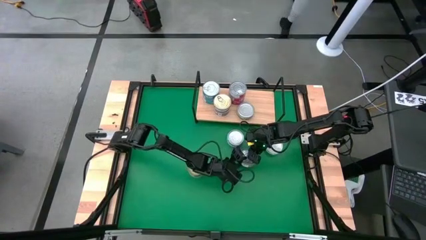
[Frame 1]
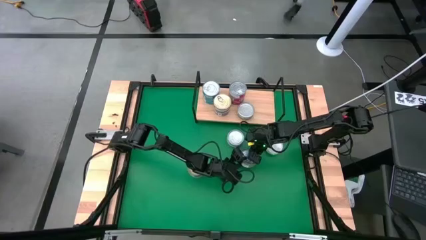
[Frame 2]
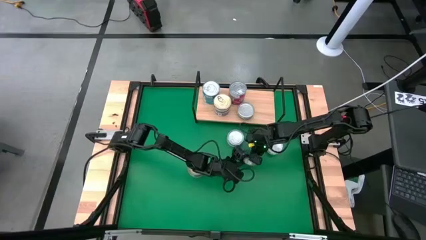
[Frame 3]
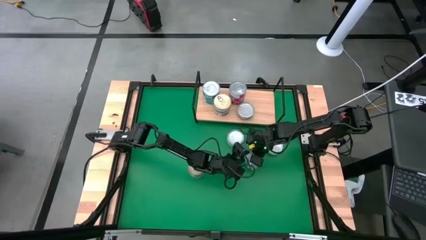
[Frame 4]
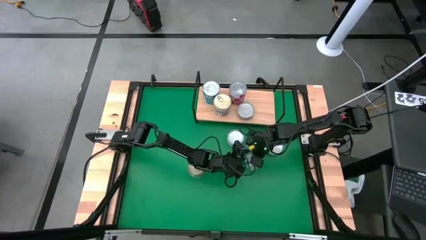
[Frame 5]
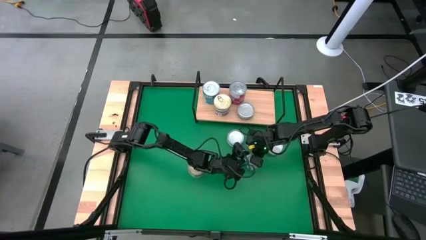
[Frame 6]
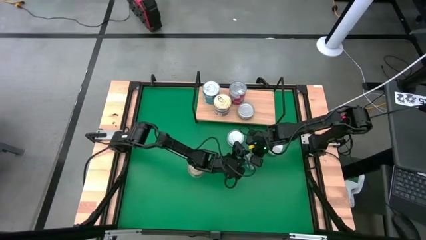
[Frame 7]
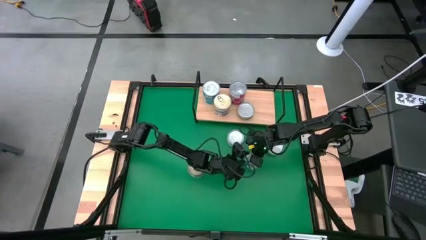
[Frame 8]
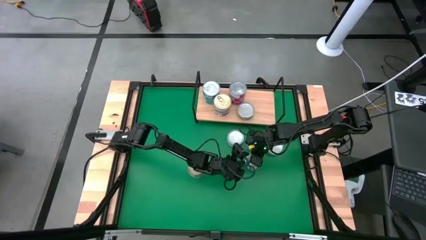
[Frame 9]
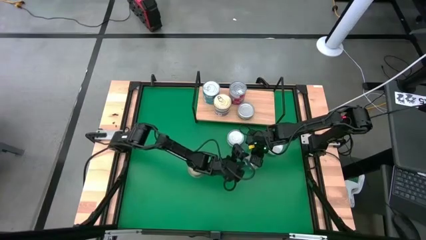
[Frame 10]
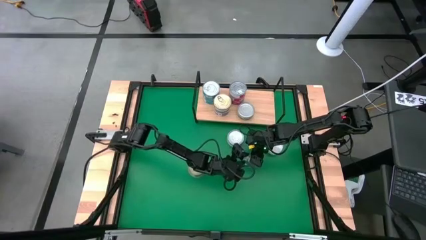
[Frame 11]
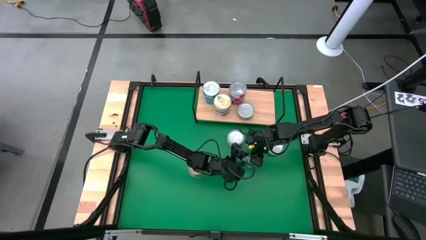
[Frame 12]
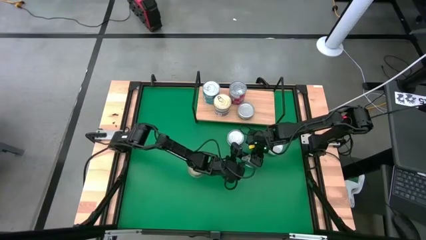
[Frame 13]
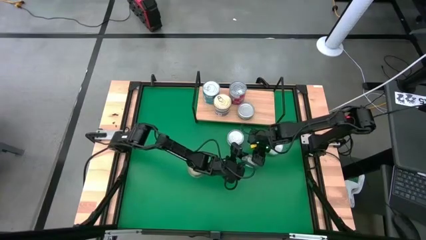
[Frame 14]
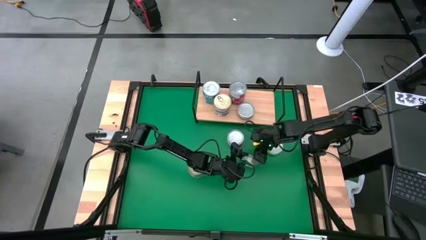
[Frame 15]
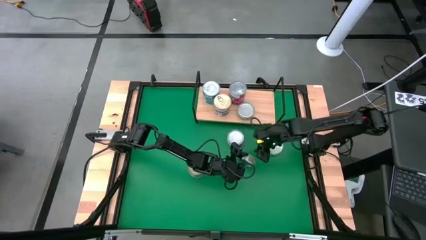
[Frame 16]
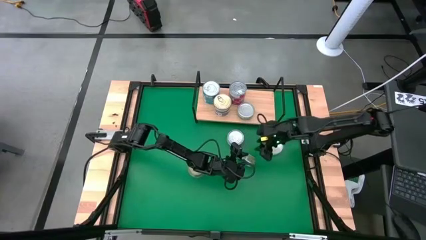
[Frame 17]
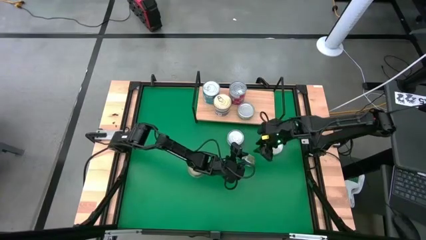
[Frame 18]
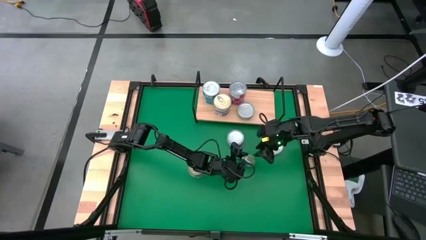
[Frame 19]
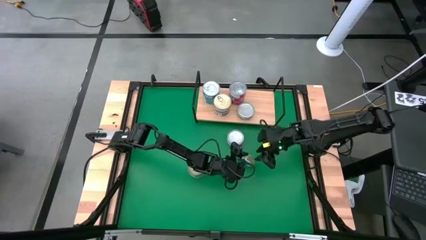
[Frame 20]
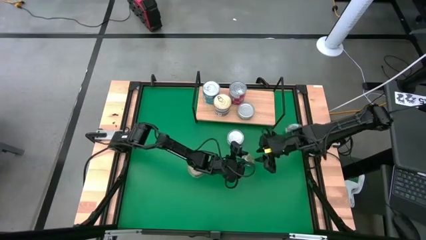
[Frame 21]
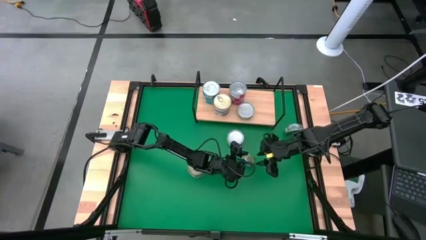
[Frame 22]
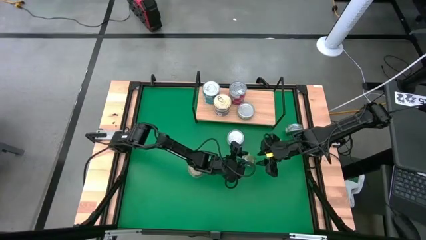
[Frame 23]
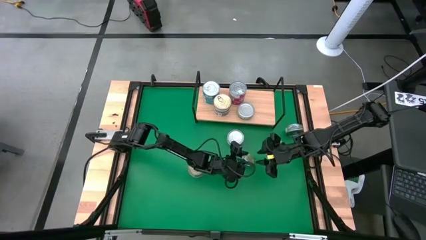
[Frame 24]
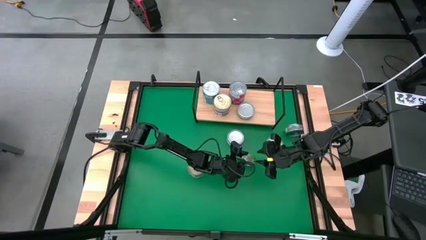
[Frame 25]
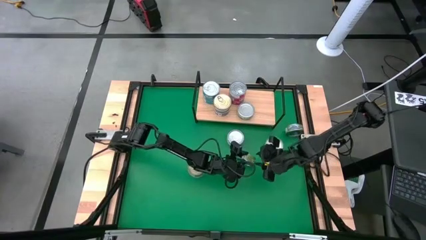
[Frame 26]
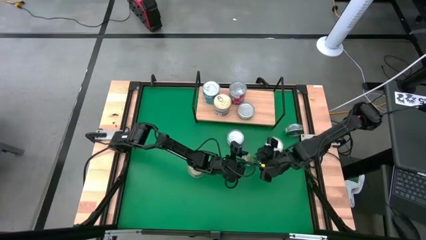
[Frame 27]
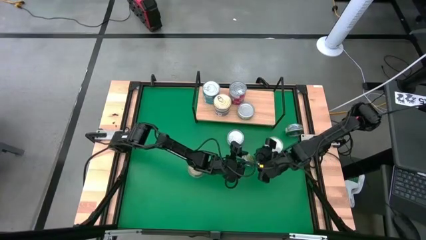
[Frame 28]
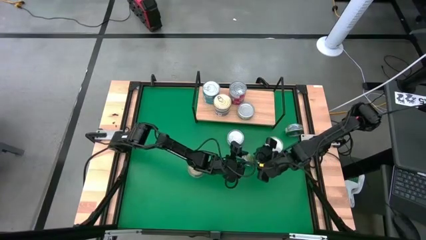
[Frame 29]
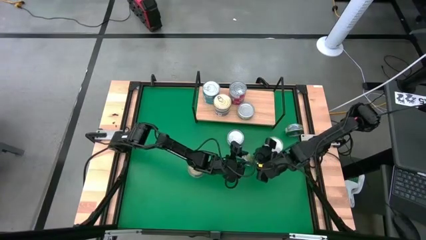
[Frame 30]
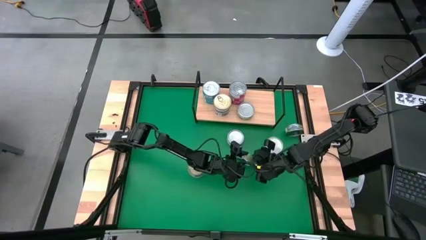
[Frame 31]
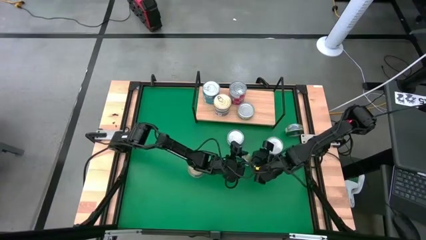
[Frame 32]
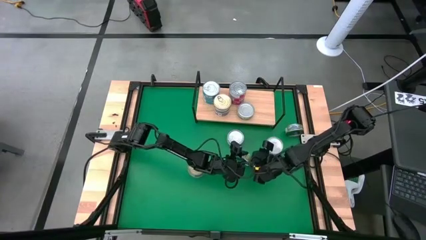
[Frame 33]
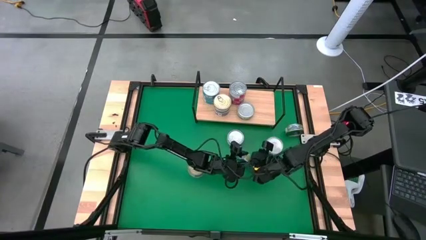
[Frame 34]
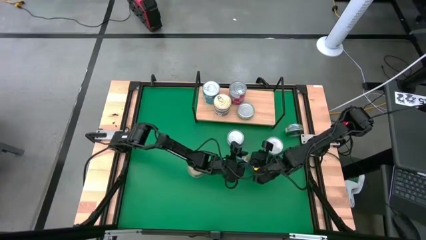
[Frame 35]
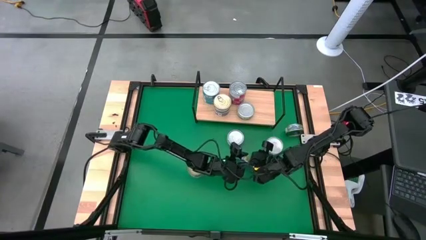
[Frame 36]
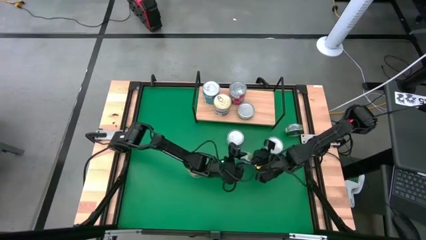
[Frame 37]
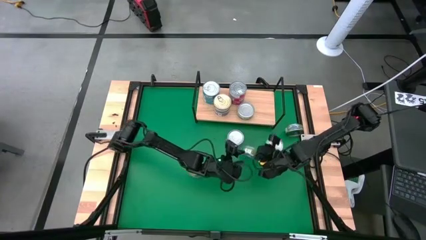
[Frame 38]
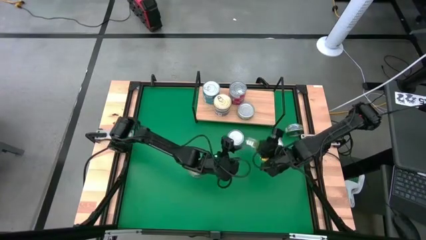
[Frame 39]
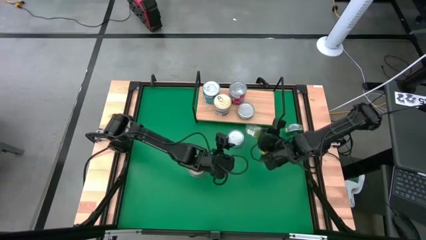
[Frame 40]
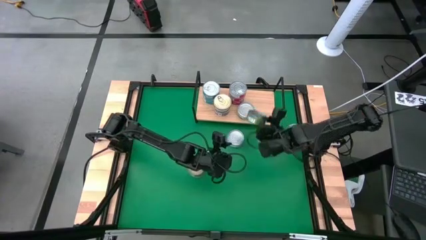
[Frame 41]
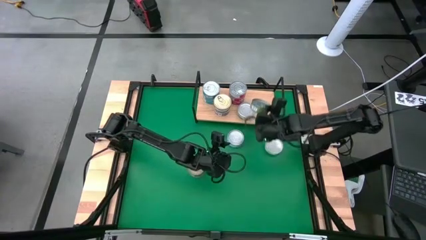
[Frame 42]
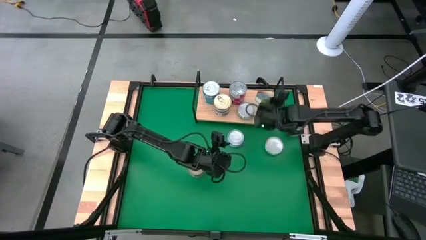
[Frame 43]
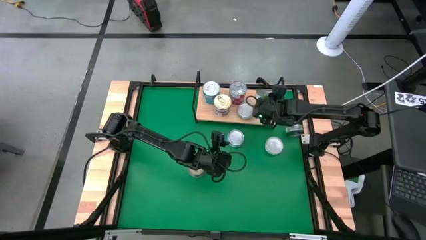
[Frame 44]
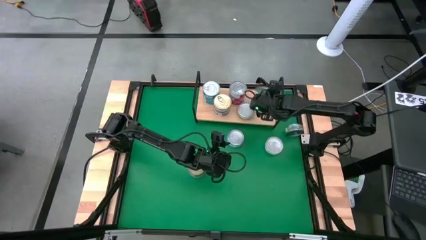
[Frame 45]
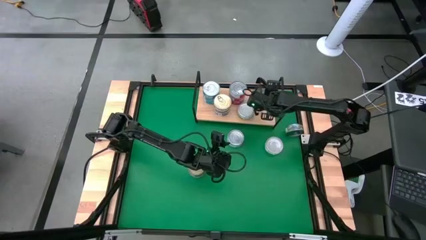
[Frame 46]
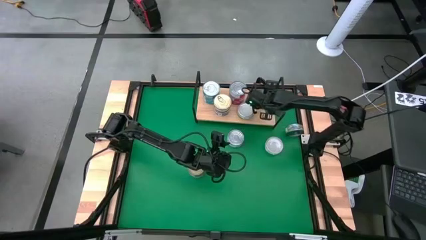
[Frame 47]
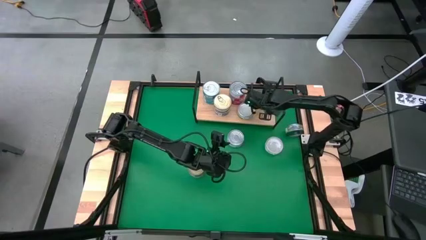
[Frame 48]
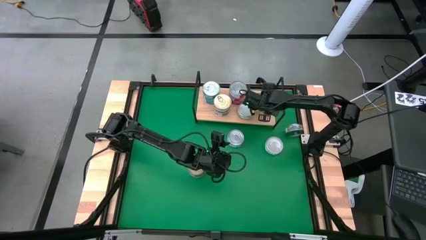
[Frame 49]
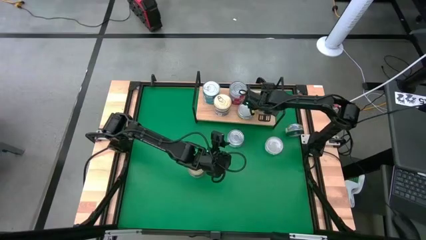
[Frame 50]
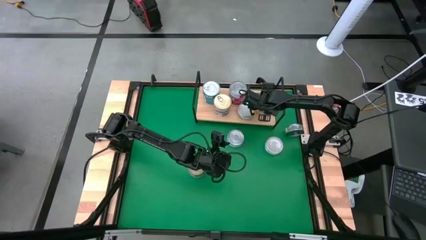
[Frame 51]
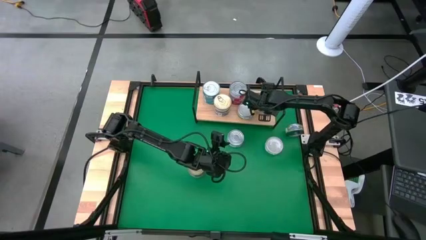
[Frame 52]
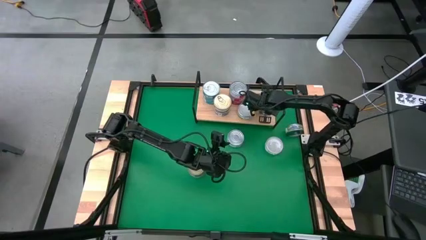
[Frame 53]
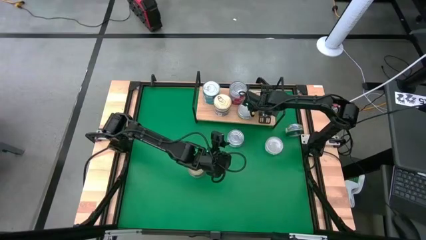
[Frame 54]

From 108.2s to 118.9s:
Task: Stack canned seafood by type on shelf
Put the green tuna can on the shelf

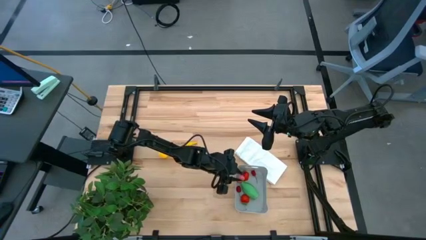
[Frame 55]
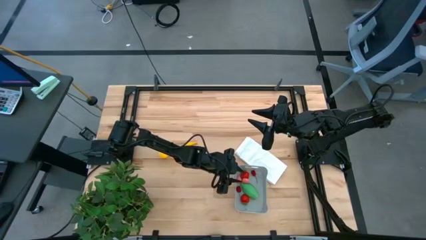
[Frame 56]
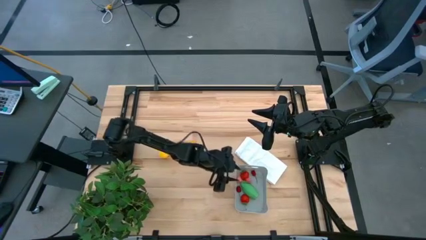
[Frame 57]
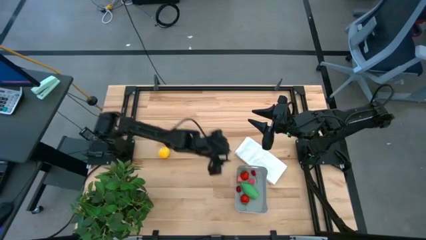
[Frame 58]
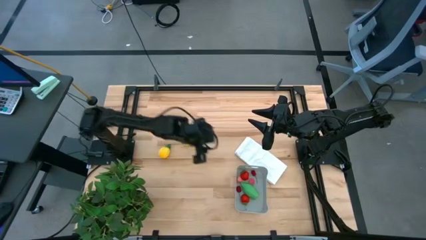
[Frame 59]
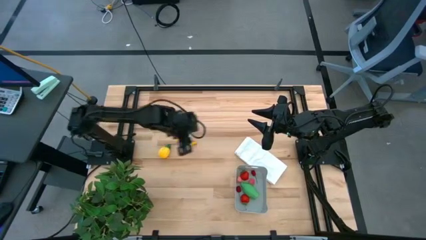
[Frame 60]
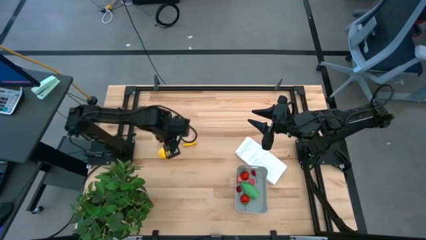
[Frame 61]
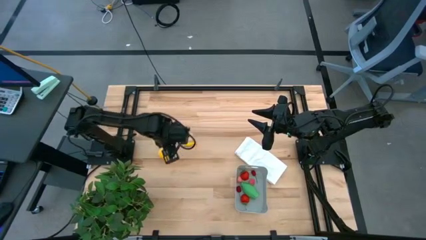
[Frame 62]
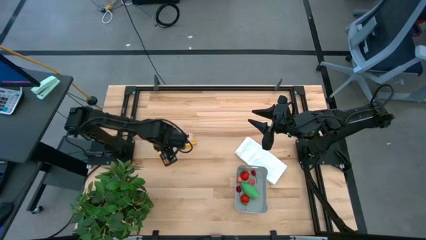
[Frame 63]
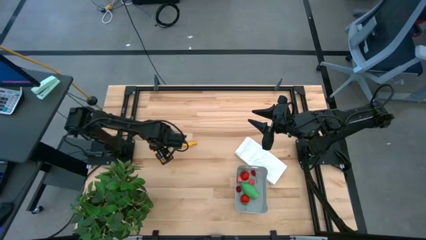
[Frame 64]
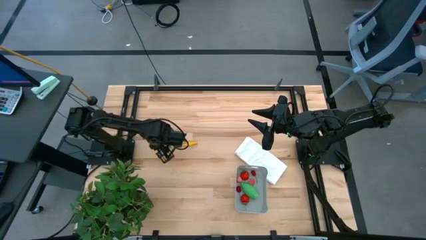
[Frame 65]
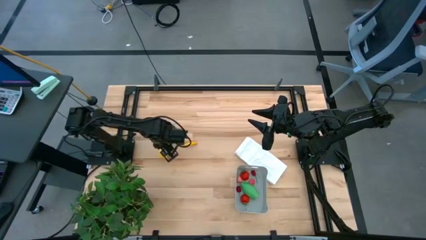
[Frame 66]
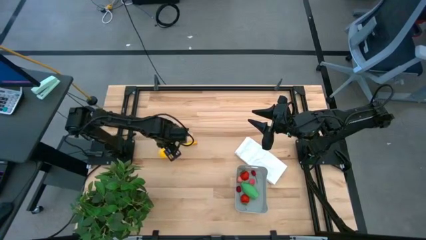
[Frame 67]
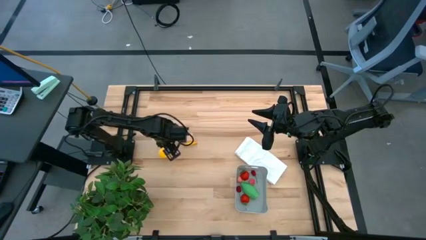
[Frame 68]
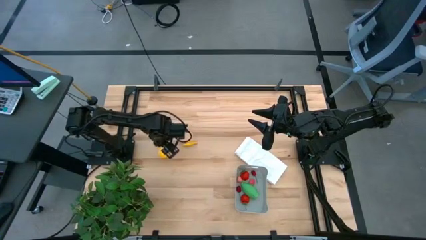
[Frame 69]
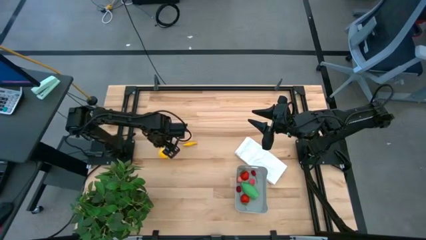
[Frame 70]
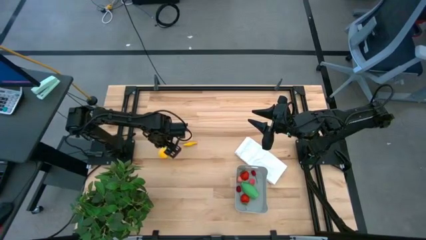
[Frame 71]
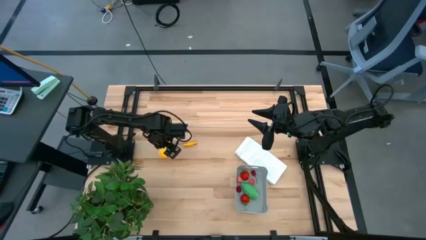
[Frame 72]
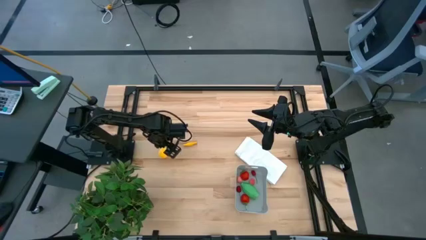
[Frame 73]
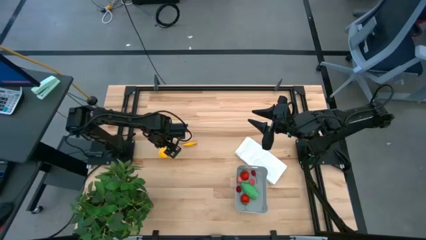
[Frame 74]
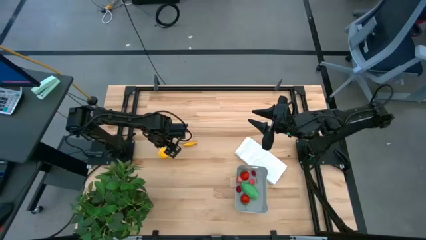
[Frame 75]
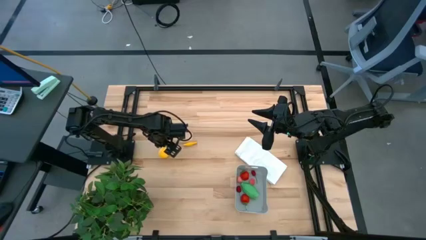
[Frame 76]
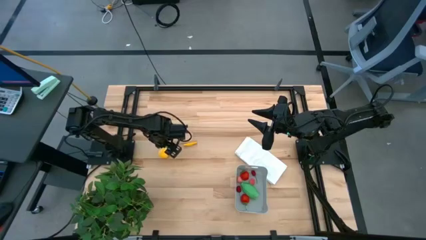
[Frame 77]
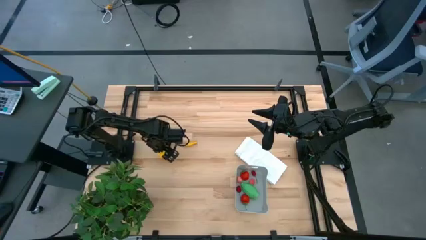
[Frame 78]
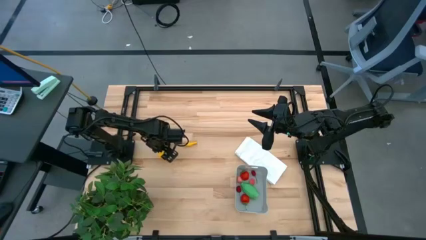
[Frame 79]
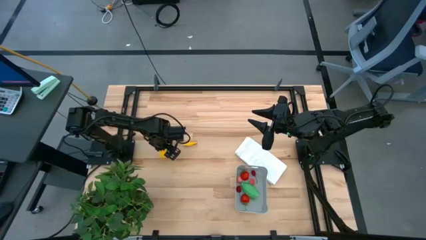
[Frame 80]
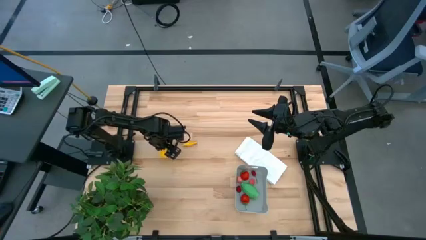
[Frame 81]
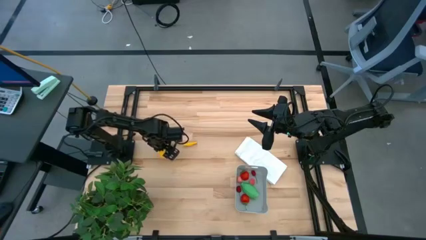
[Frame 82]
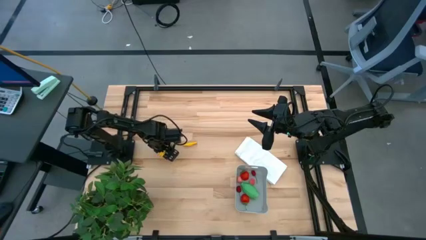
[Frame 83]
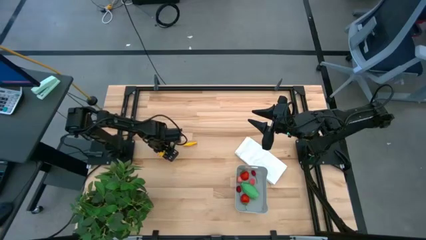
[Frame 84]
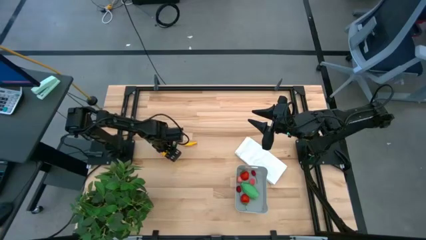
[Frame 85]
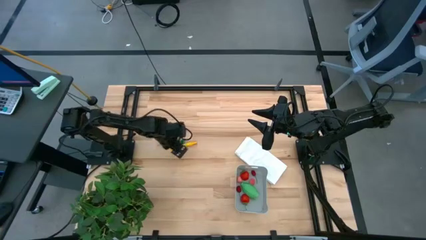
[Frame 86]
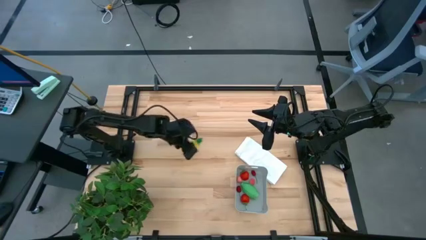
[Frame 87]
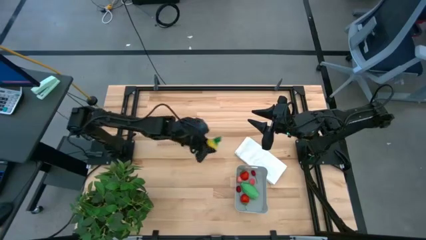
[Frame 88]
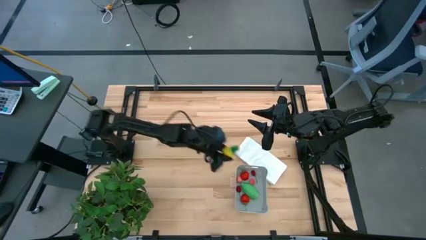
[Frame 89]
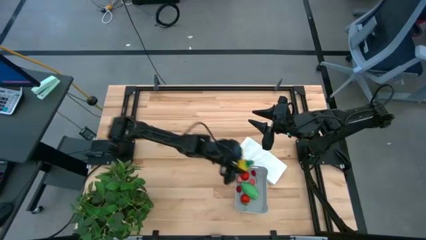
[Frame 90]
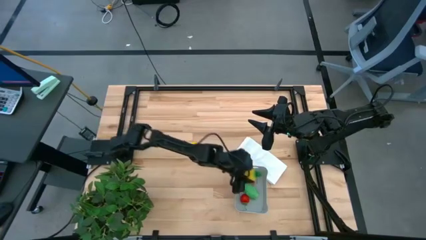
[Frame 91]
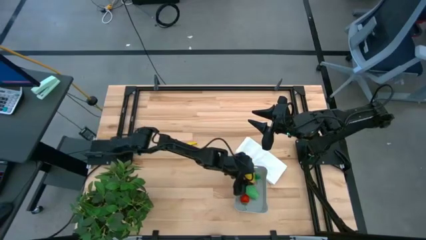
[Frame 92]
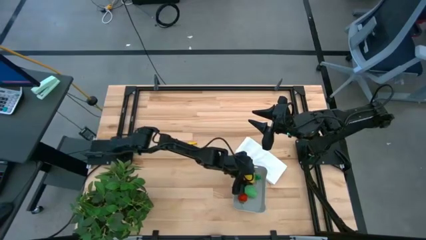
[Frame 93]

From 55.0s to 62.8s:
Task: Pick and placing Produce into tupperware
Put the yellow pineapple into the gray bin
